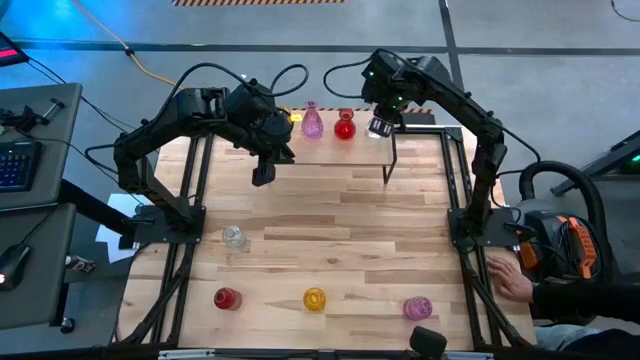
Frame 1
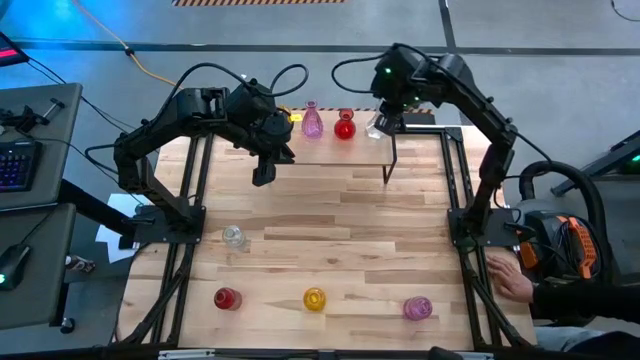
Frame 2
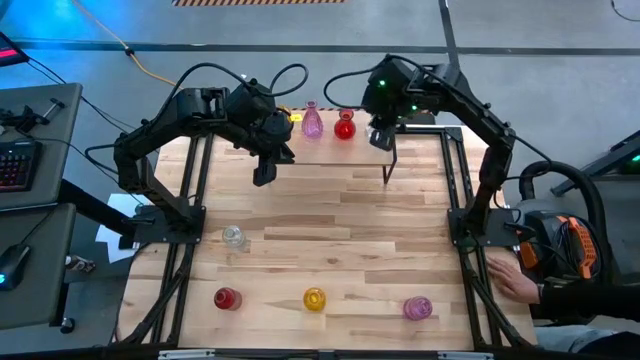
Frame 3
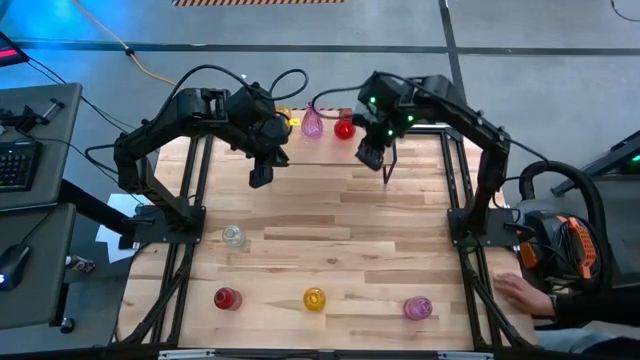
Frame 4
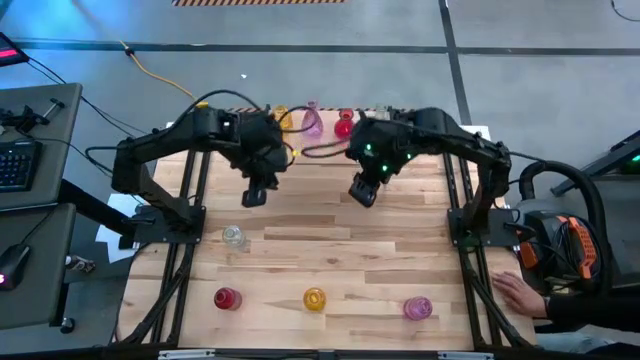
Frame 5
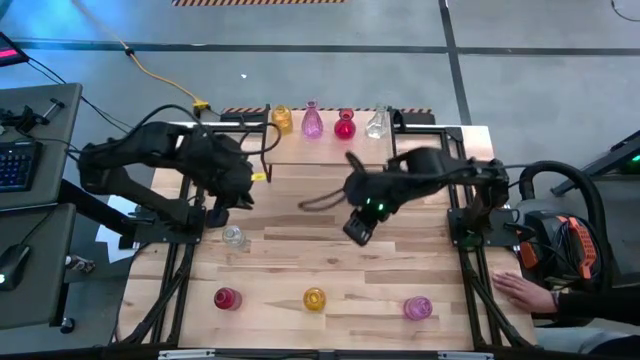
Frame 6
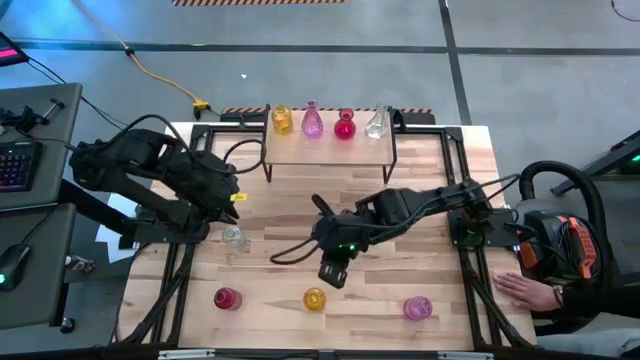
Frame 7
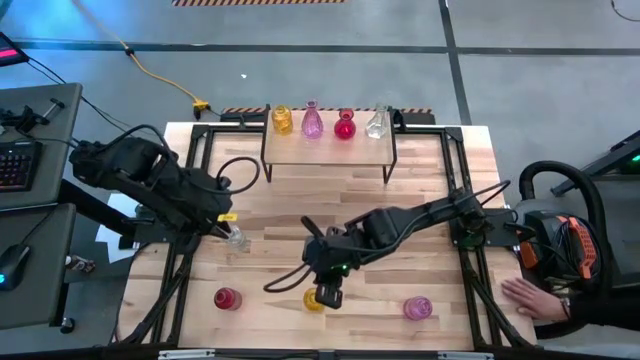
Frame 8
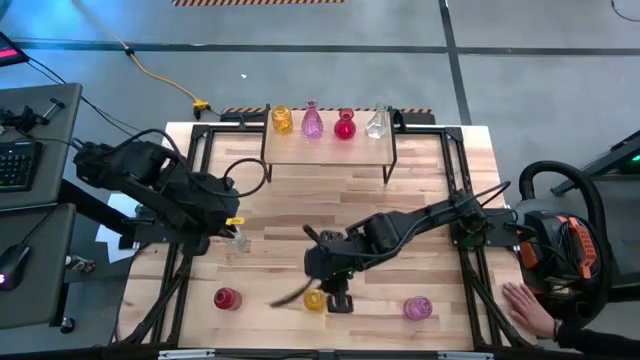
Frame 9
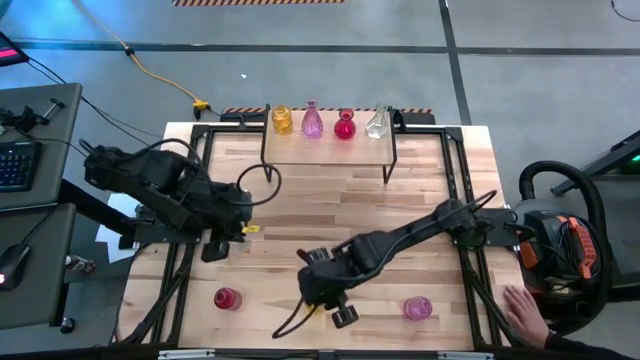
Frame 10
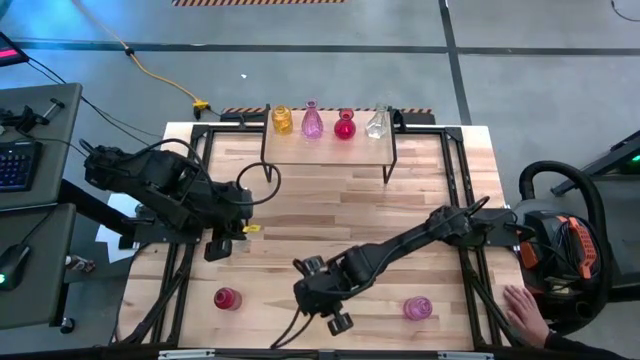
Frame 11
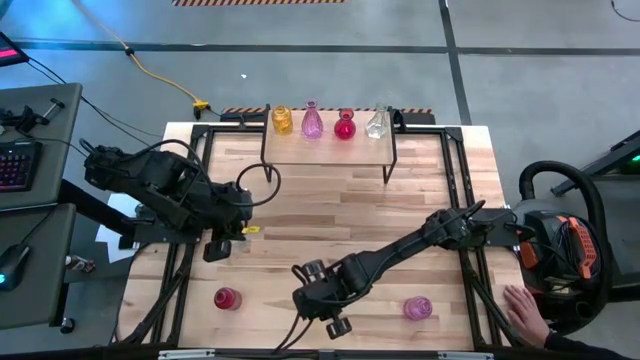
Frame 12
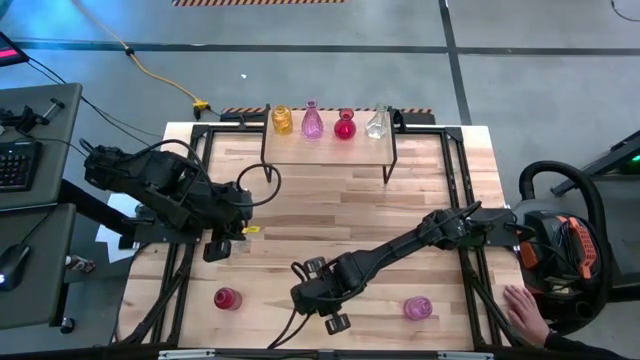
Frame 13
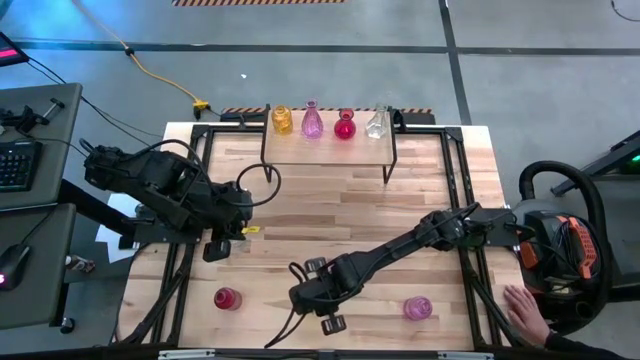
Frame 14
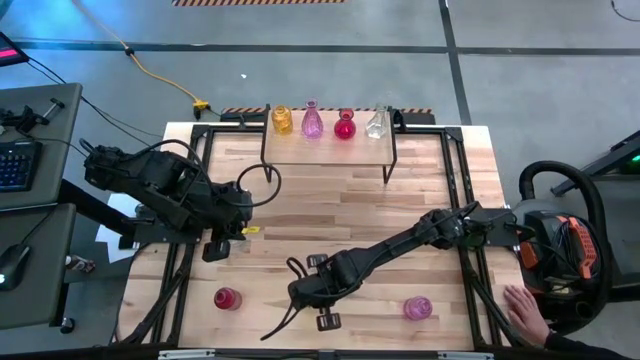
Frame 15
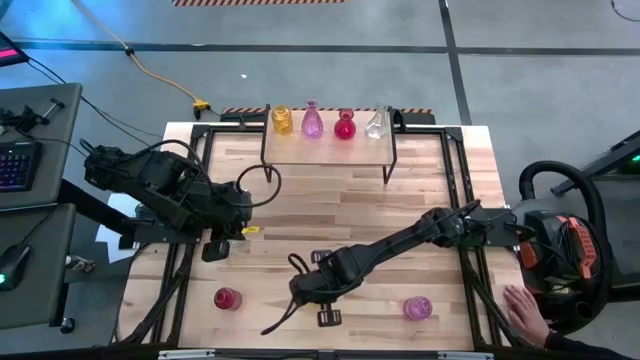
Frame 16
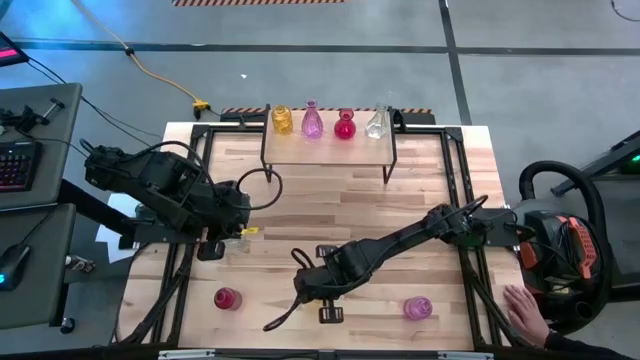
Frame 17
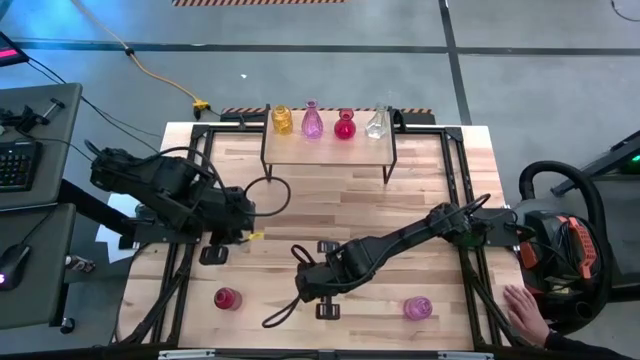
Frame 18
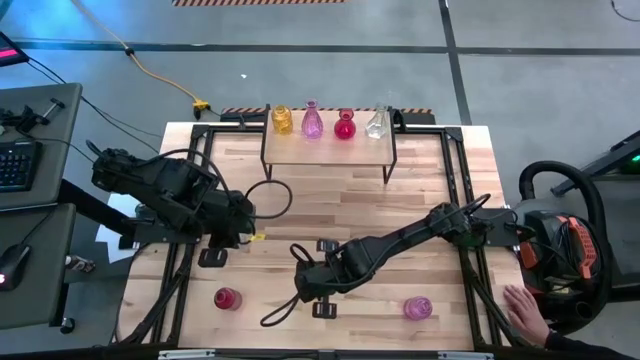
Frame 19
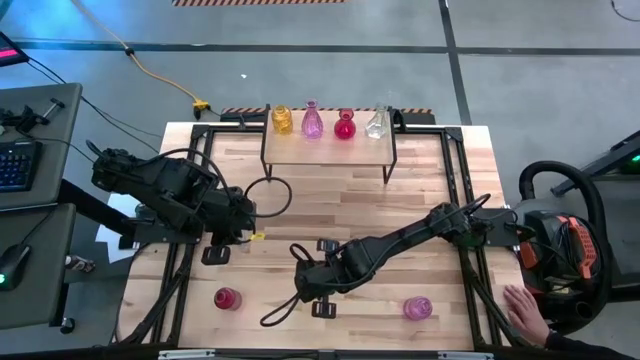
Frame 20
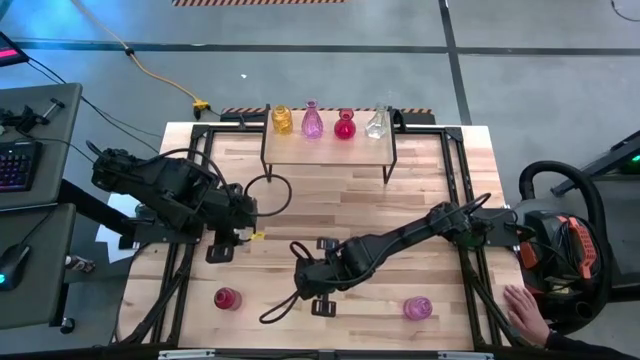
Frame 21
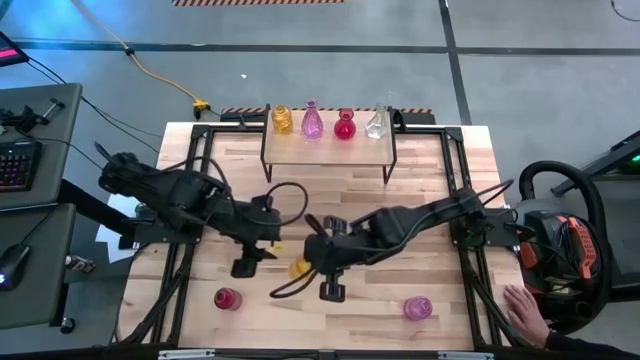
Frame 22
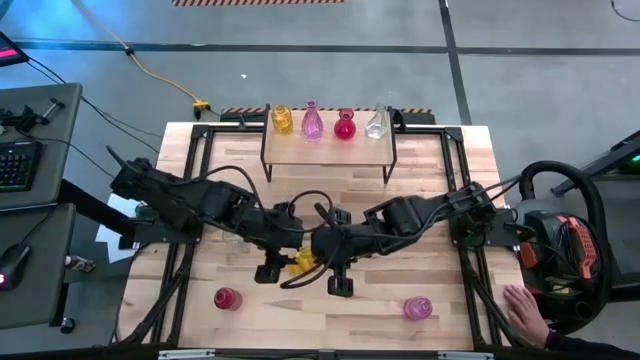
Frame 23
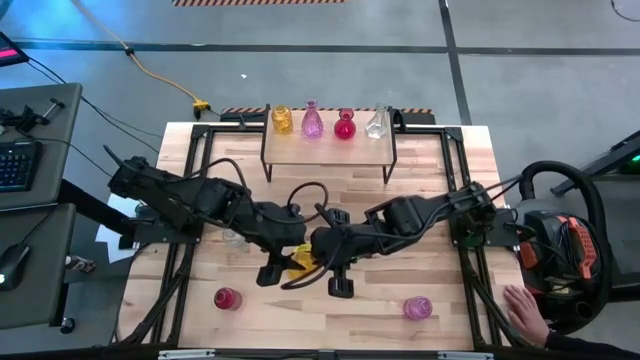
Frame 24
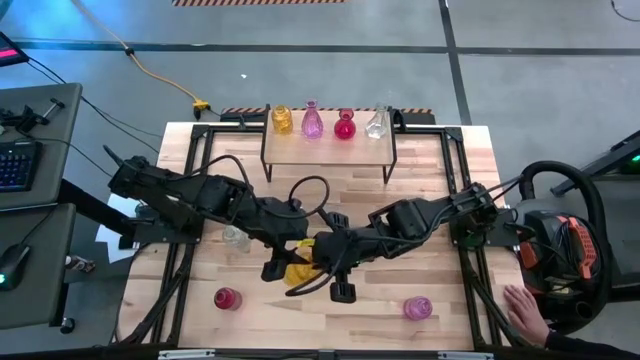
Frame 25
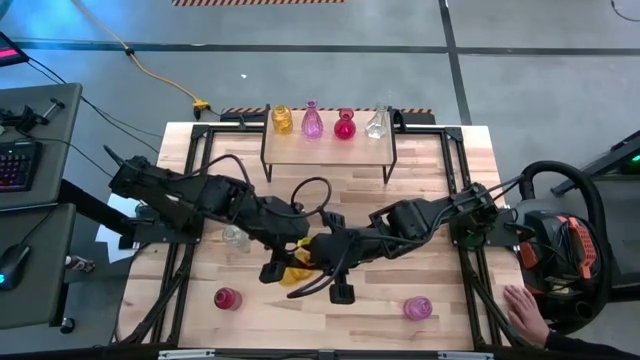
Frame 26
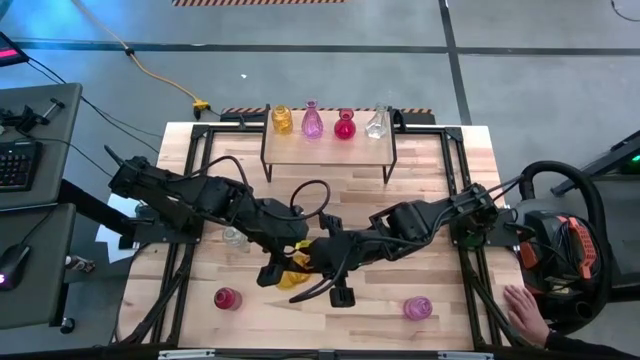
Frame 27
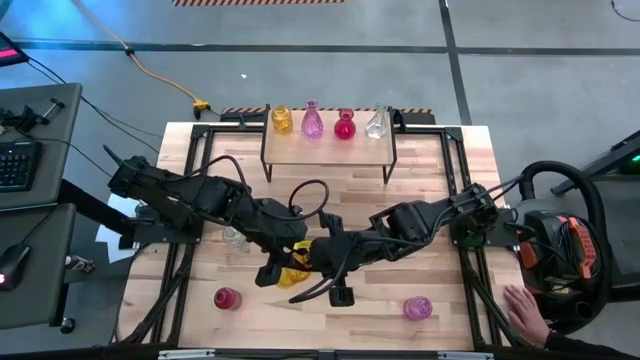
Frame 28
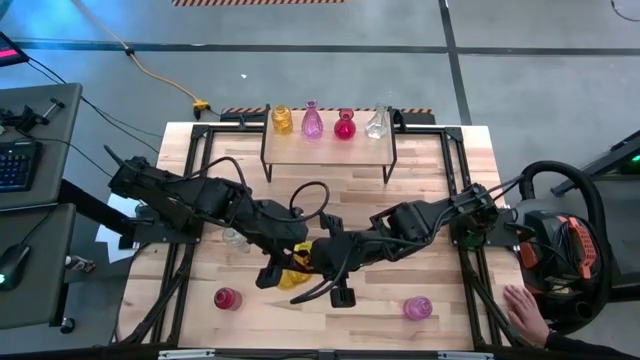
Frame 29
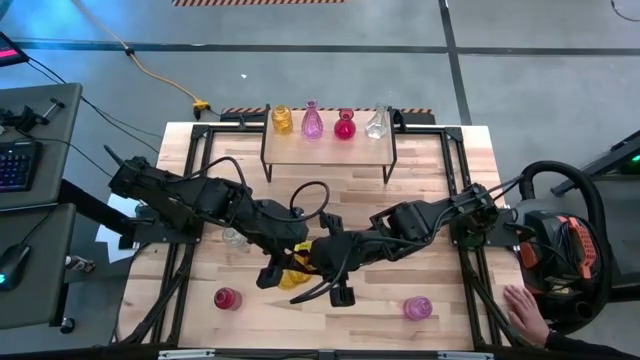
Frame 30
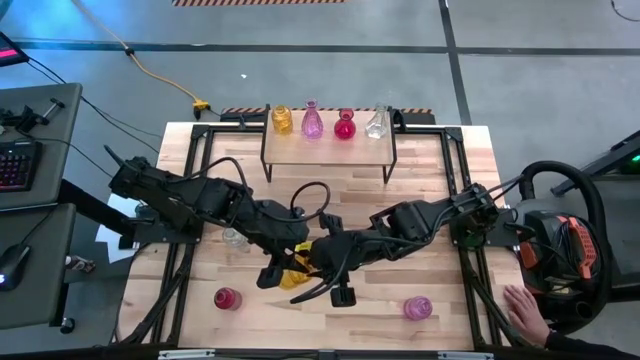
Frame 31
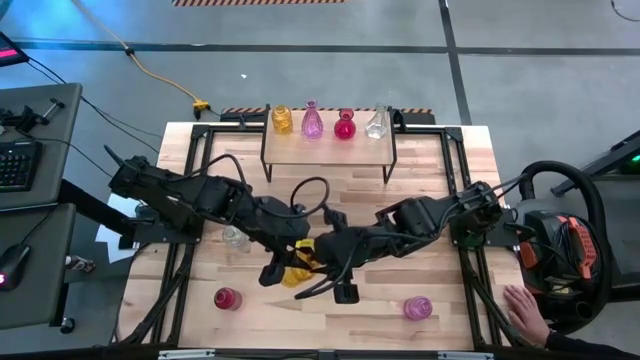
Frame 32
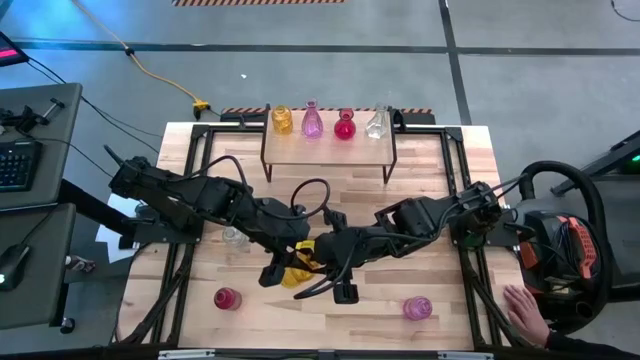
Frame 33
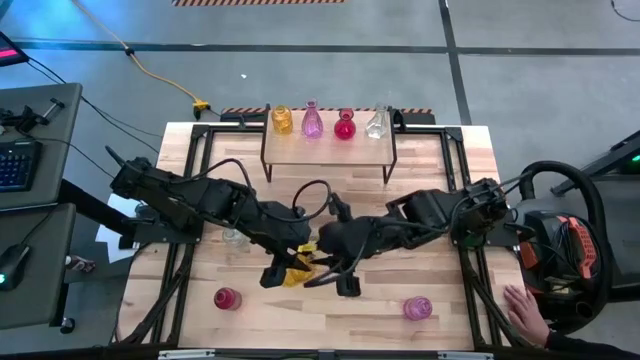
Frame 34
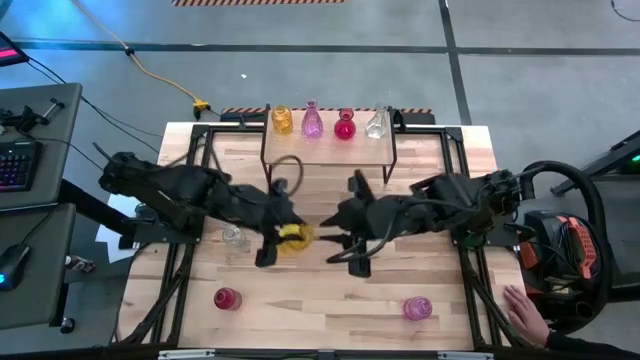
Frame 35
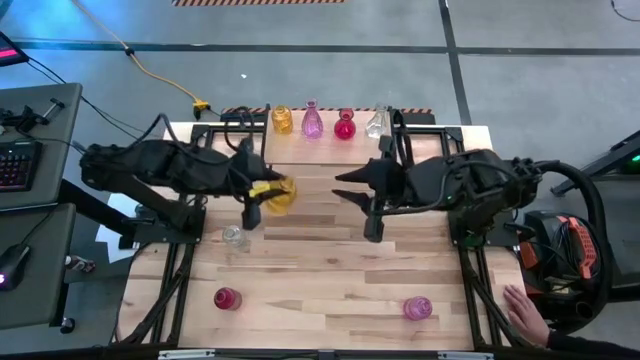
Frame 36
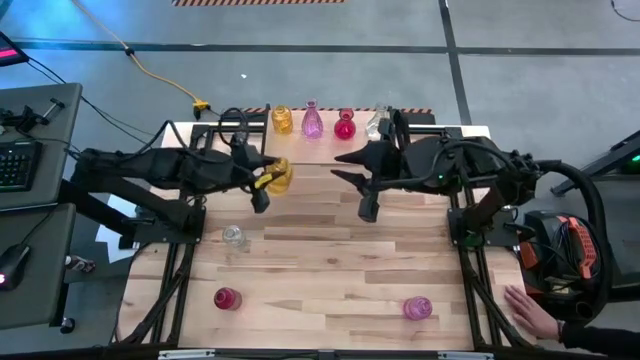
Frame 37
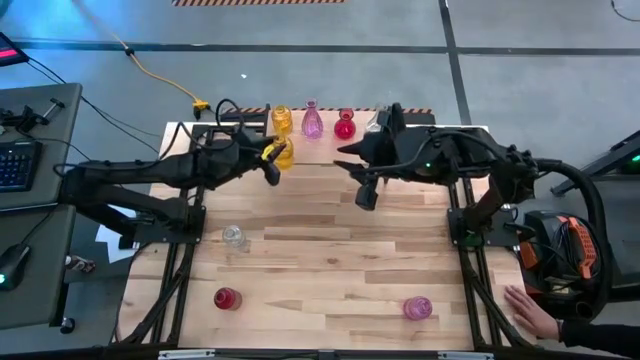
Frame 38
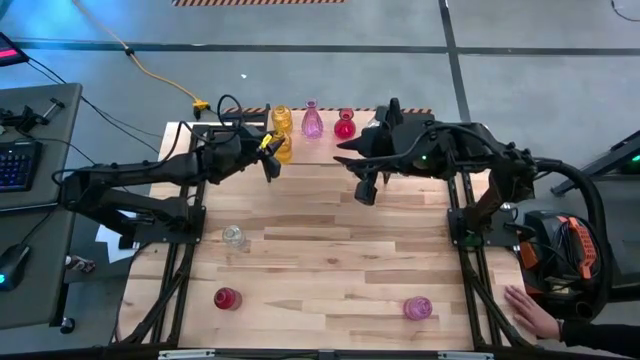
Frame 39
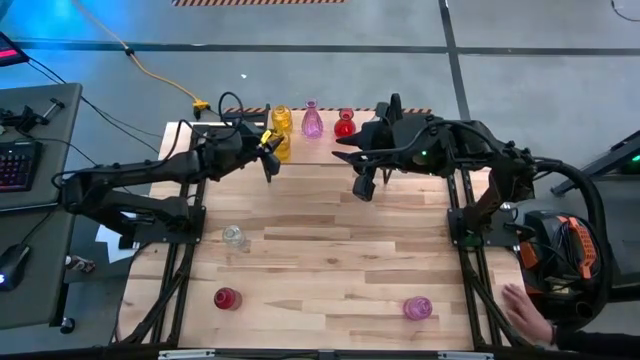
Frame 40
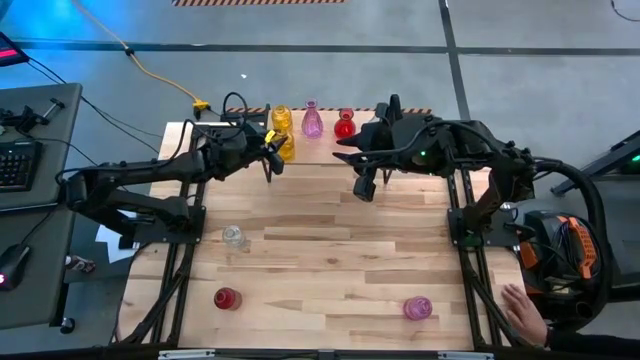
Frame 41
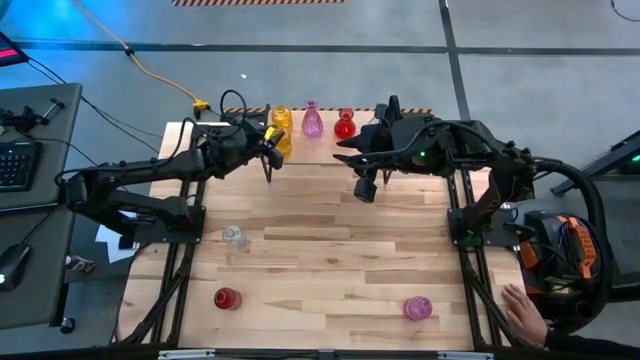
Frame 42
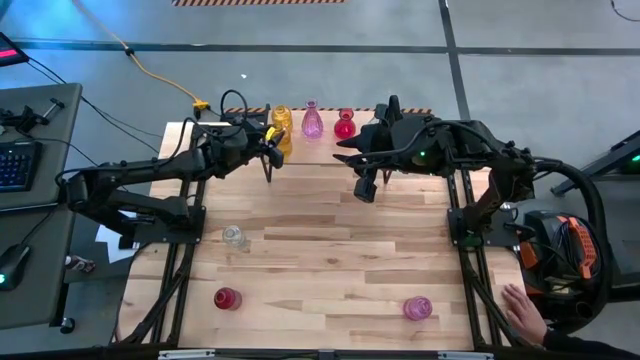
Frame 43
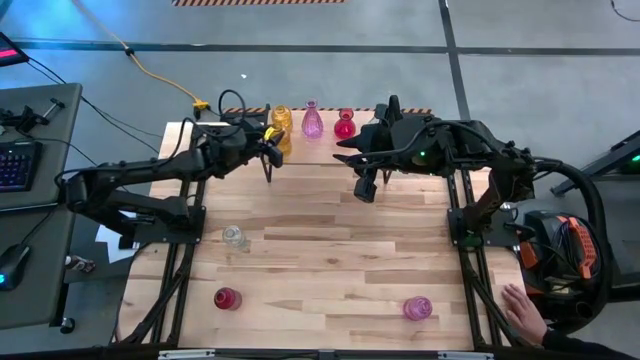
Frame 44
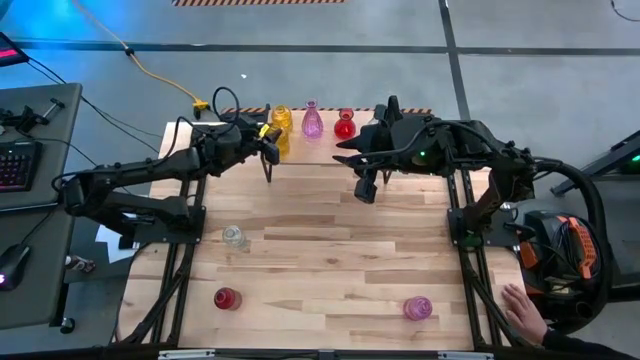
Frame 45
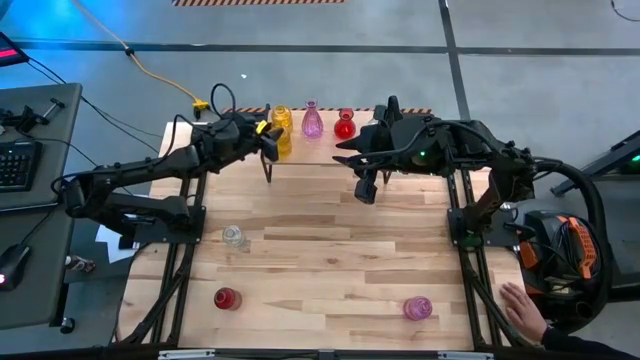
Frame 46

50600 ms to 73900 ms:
Task: sort vases onto shelf
Put the yellow vase on the shelf
